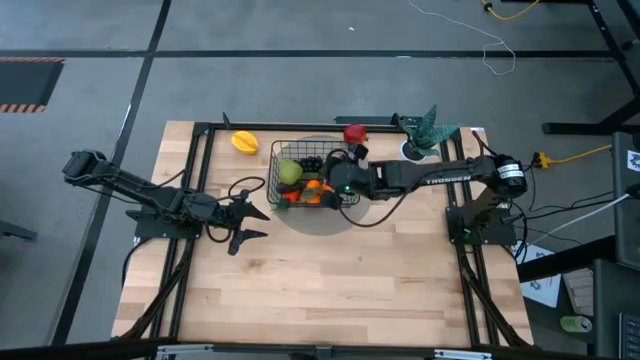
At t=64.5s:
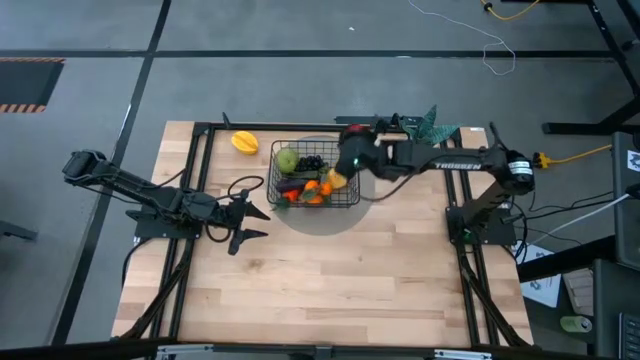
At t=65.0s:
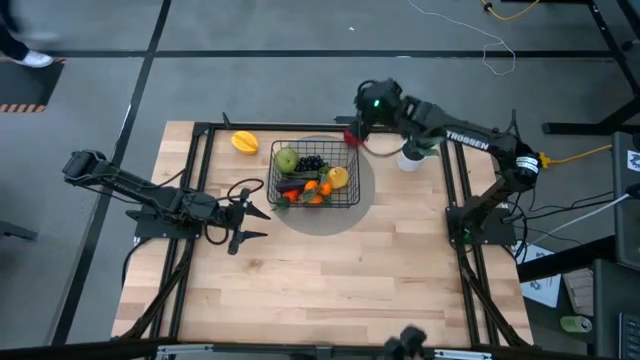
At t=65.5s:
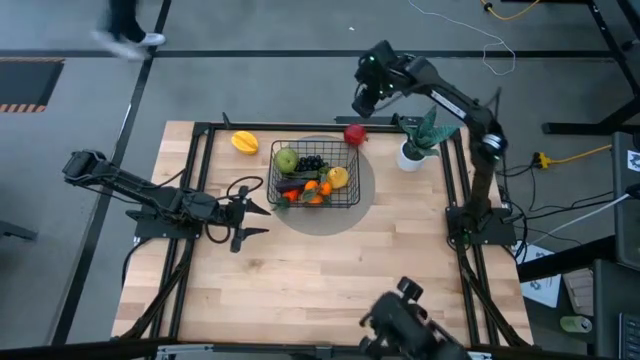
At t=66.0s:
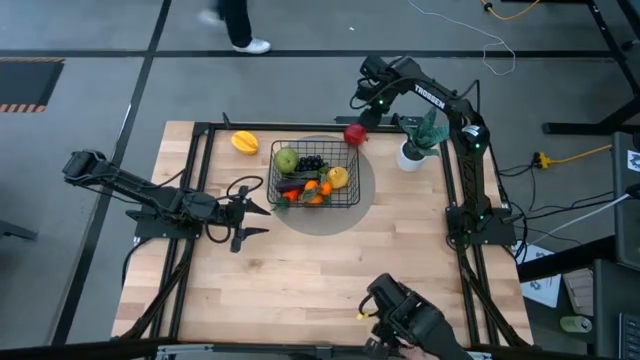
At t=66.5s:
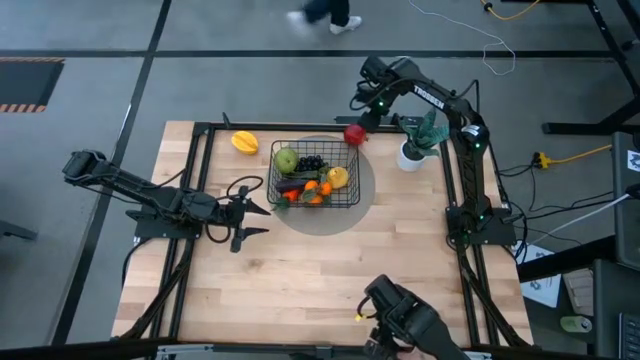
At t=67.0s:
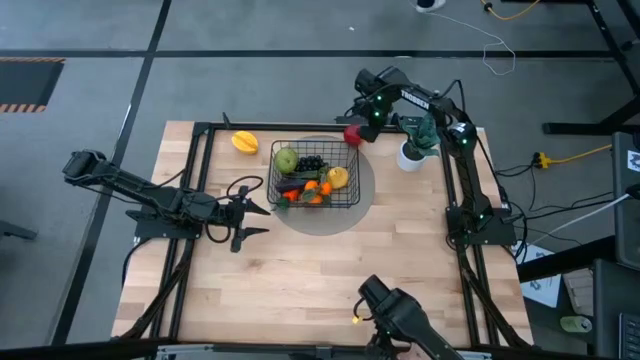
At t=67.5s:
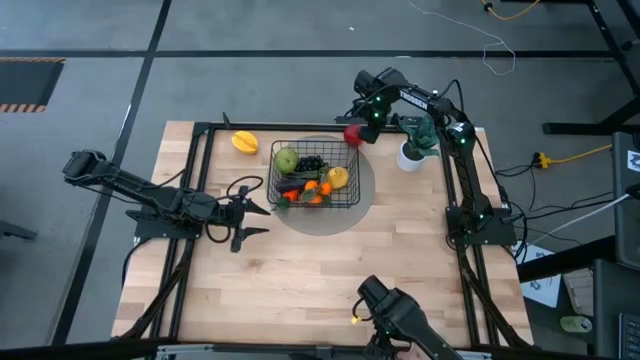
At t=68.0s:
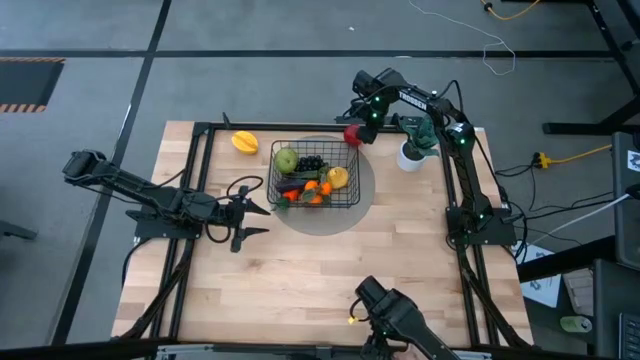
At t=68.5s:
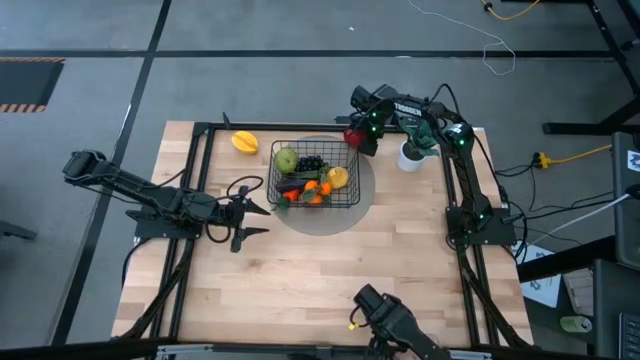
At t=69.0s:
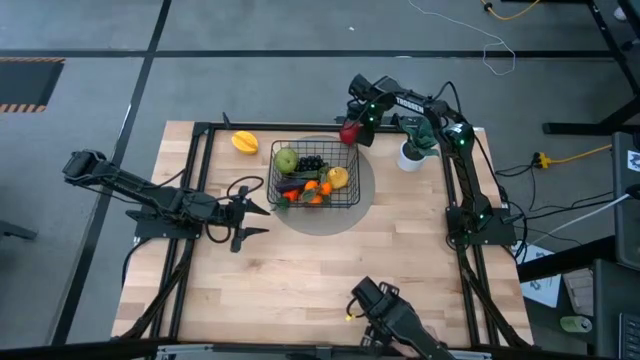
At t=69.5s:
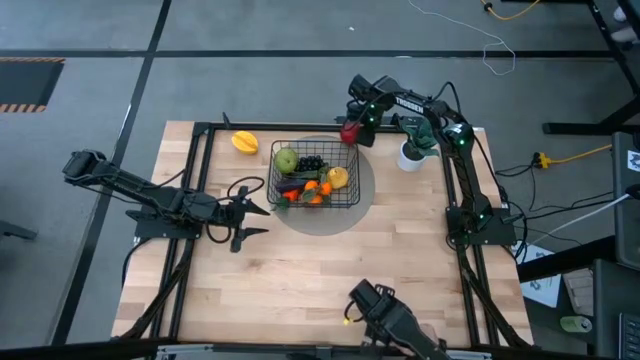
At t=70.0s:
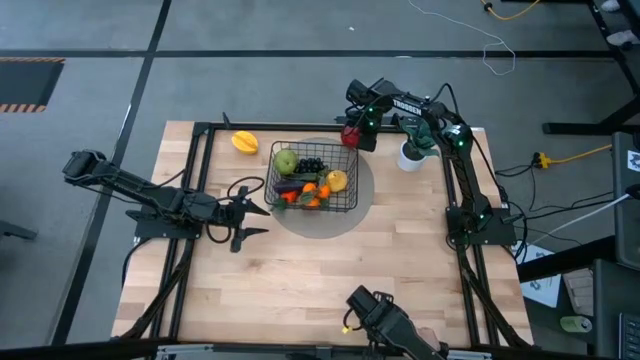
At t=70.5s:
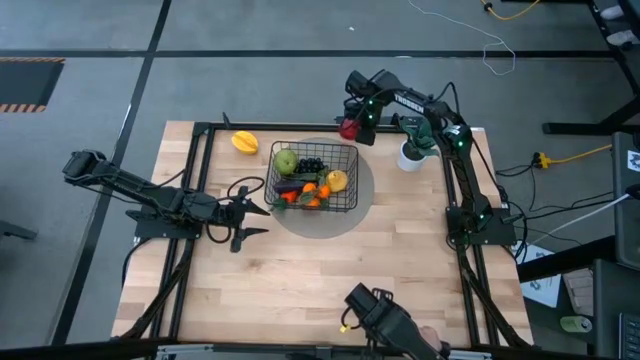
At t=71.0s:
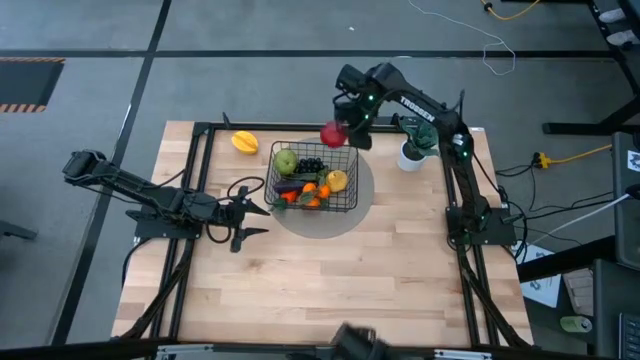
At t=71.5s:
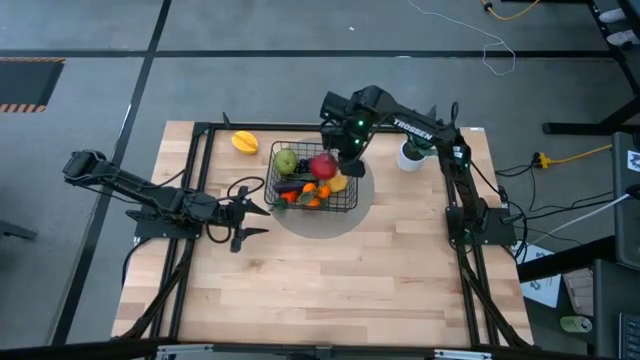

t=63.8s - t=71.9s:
Task: Build produce basket
Put the red pomegranate into the wire basket

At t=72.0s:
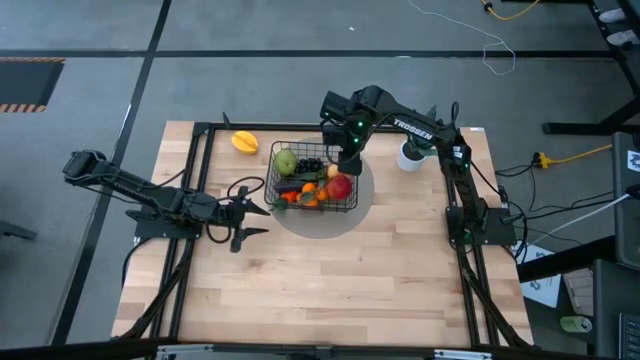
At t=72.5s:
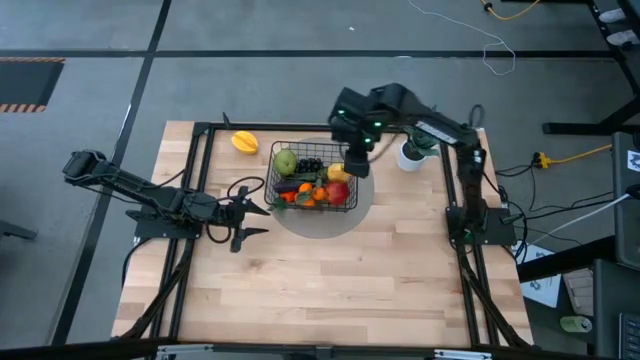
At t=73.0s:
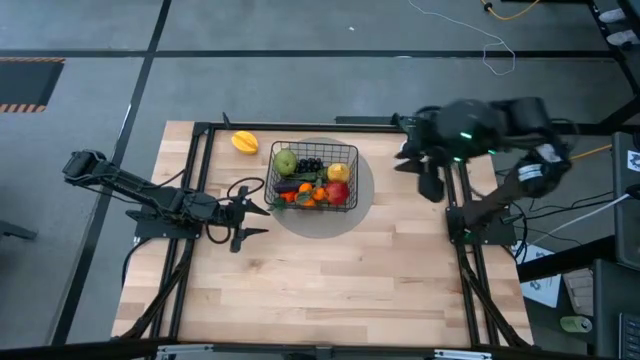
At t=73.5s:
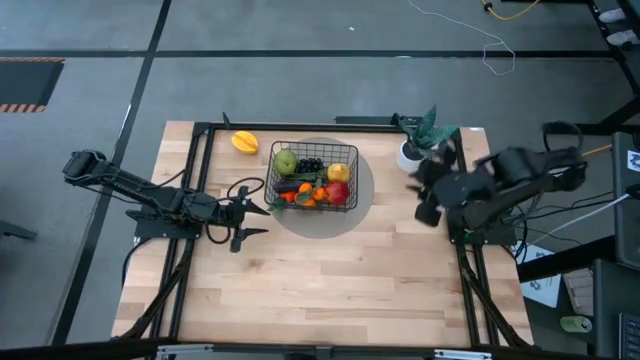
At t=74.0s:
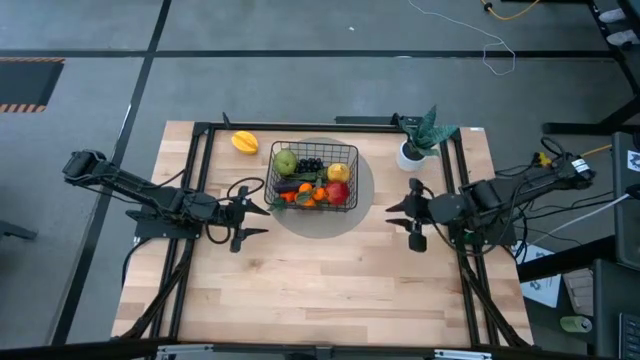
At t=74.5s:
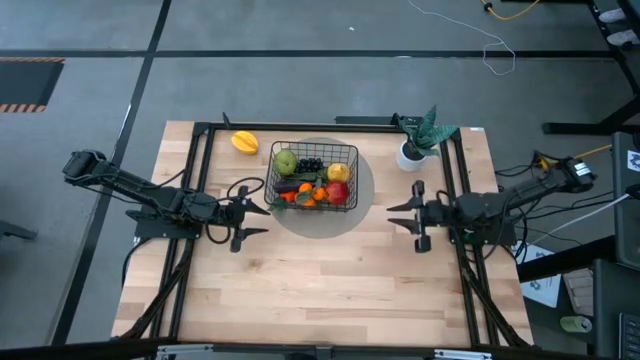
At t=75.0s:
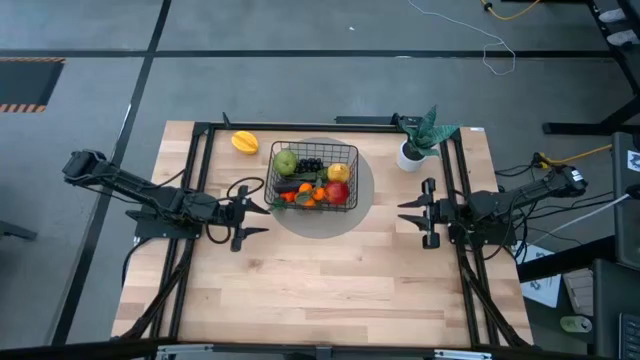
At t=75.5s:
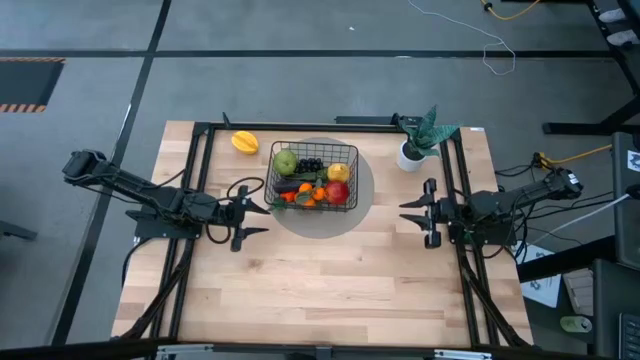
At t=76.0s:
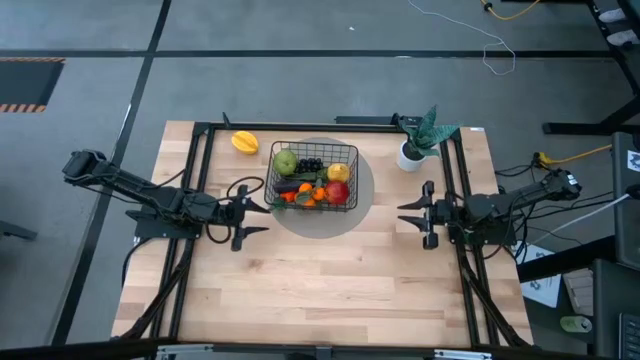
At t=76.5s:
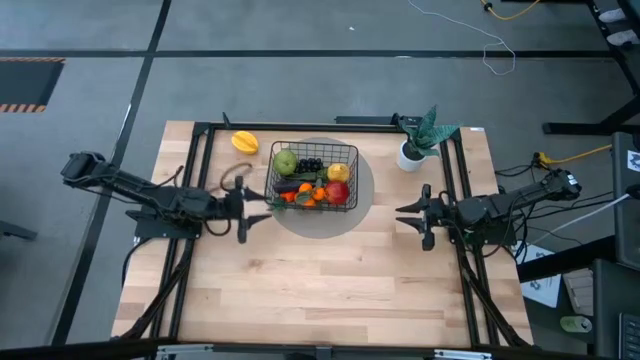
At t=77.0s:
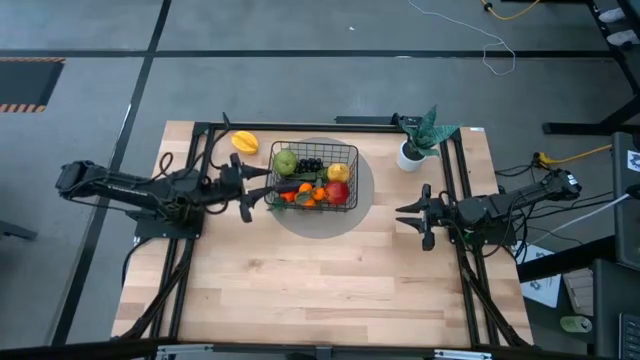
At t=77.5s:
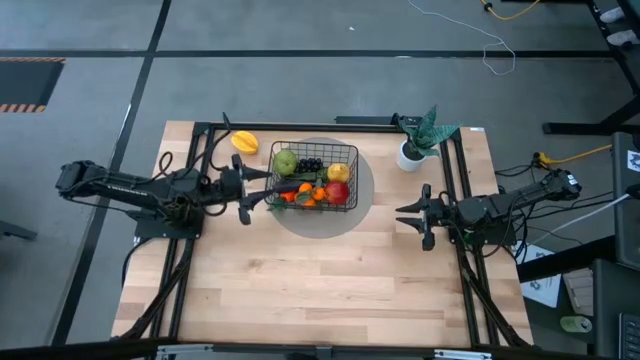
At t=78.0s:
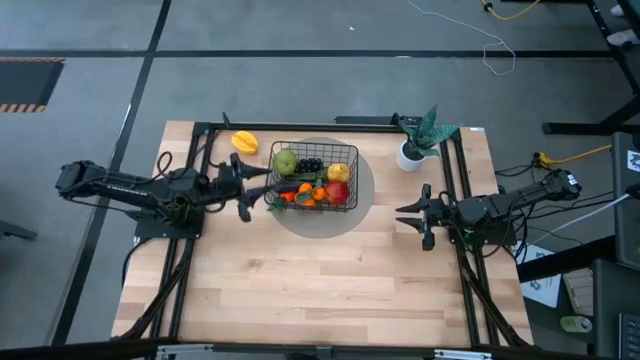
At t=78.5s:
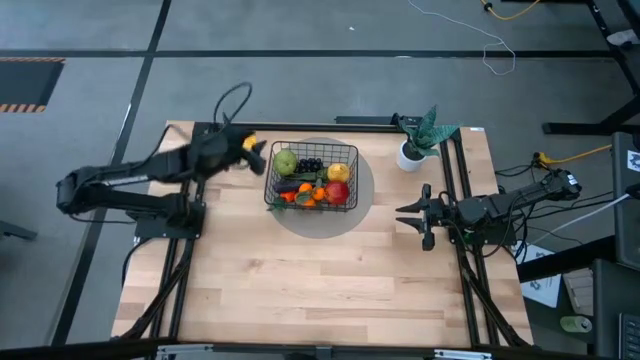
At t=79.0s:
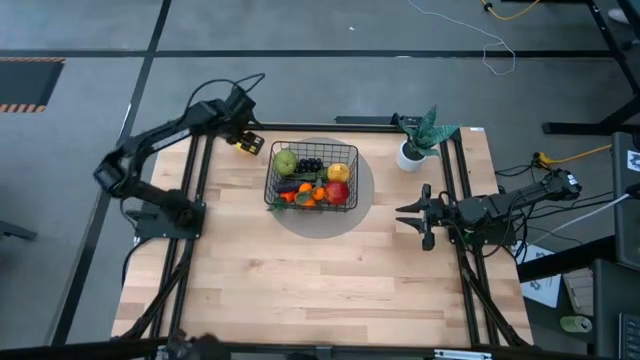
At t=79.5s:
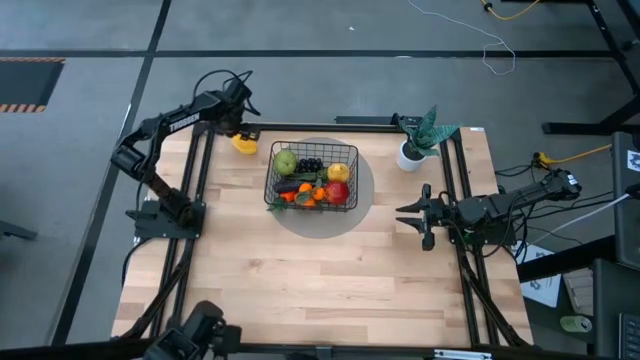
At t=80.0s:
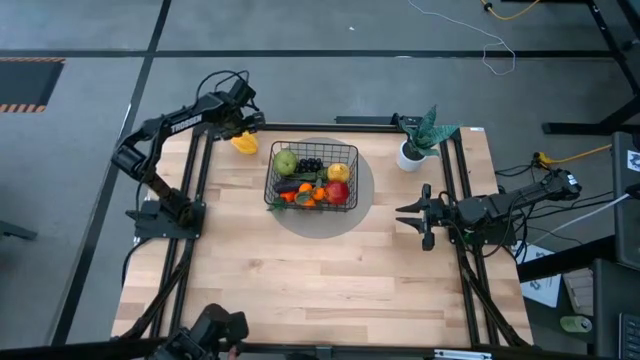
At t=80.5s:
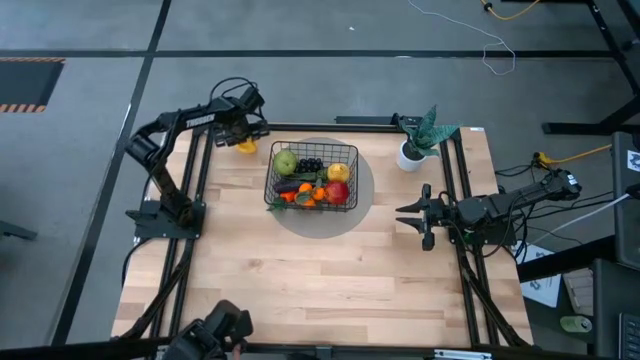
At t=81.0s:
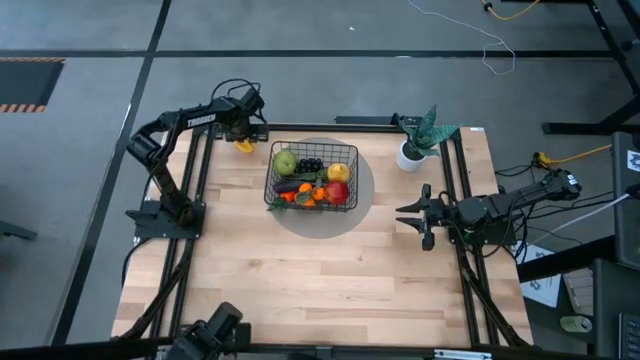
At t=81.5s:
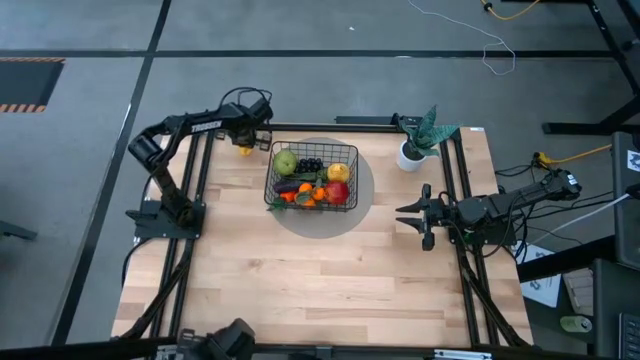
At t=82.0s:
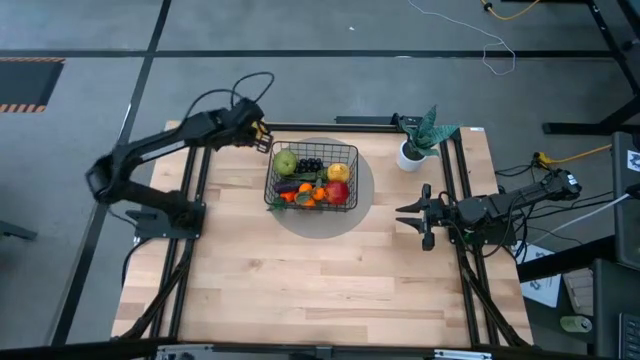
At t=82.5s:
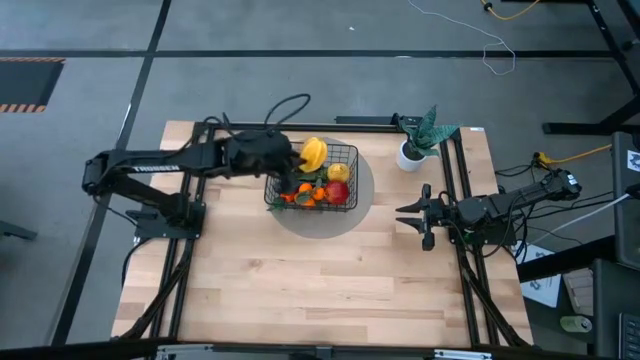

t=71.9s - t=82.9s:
Put the yellow starfruit into the wire basket

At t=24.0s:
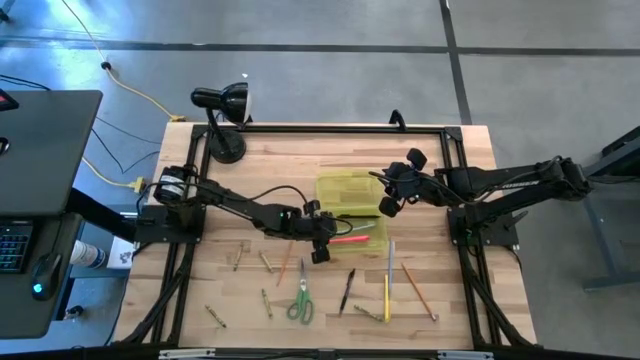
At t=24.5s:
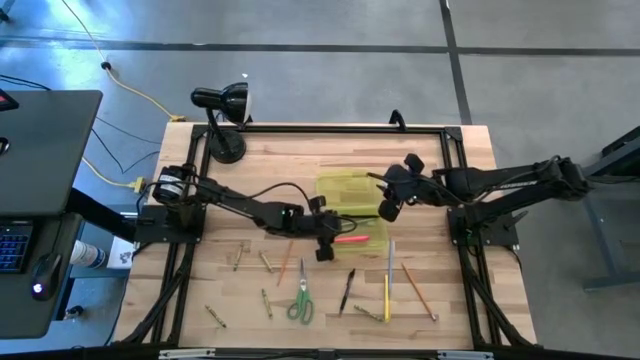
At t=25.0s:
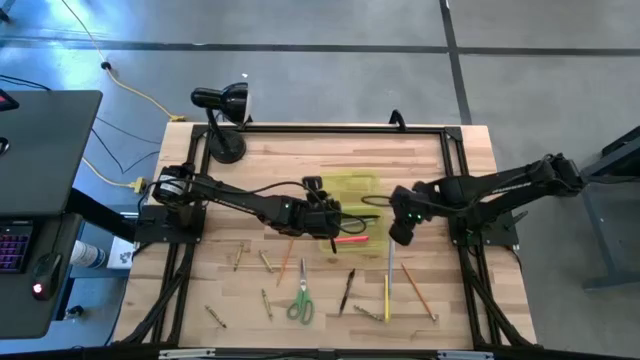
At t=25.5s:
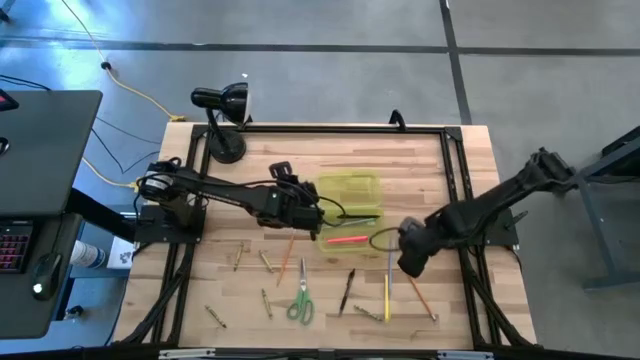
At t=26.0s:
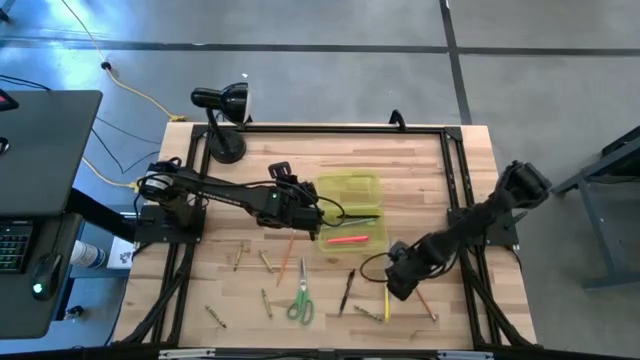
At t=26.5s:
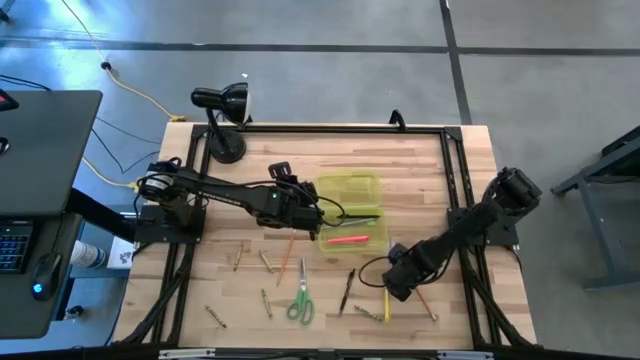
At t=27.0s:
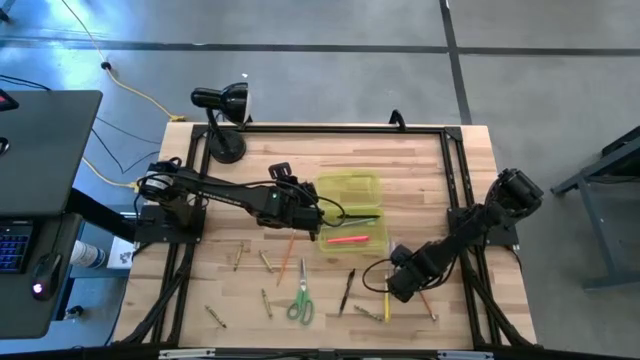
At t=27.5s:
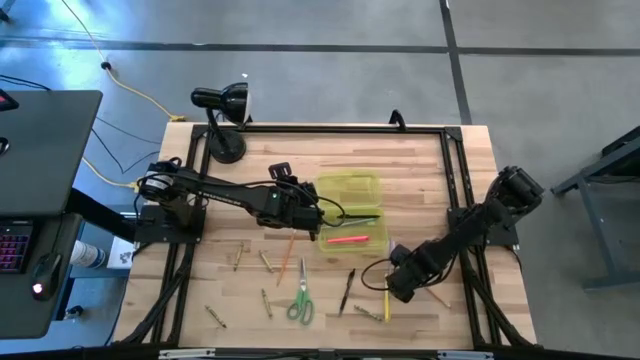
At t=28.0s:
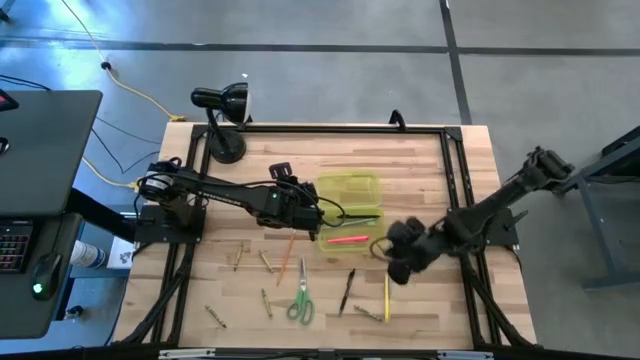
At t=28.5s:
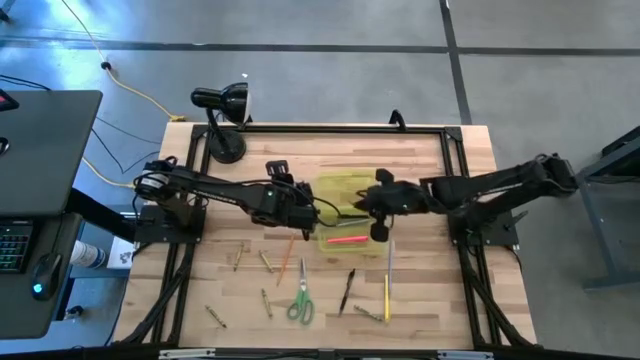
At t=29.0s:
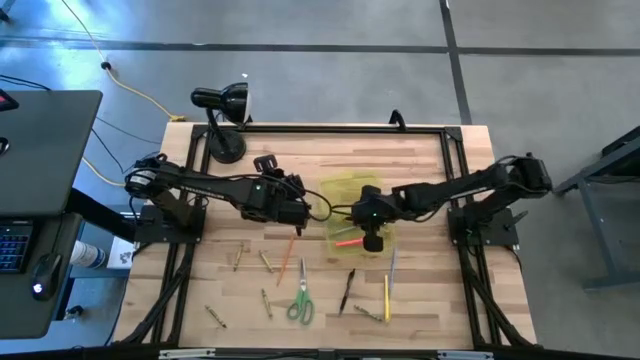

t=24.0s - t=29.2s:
Task: Pick & place school supplies into a supply box
Put the orange pencil into the yellow supply box
